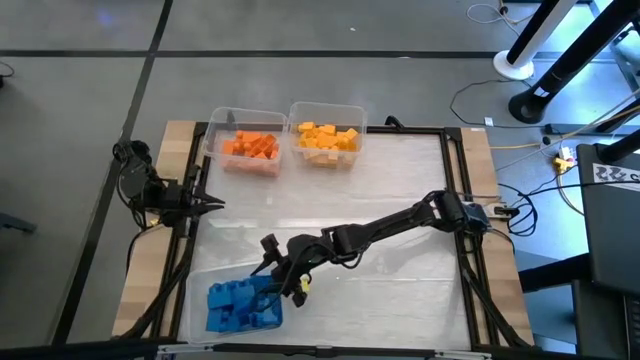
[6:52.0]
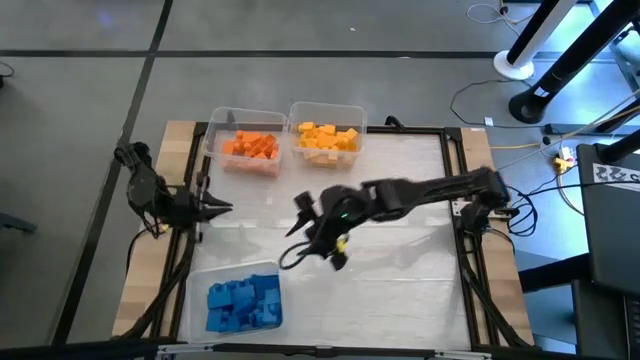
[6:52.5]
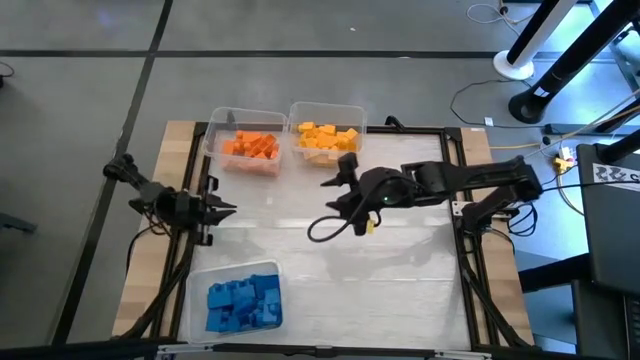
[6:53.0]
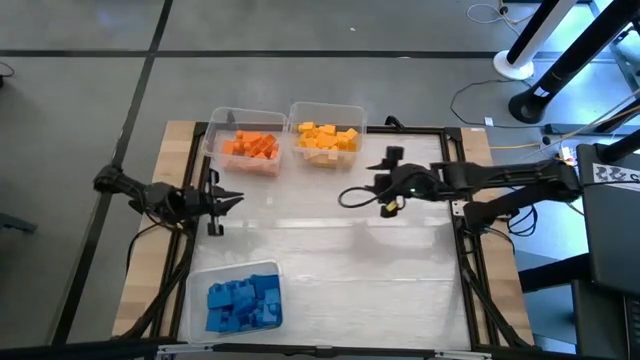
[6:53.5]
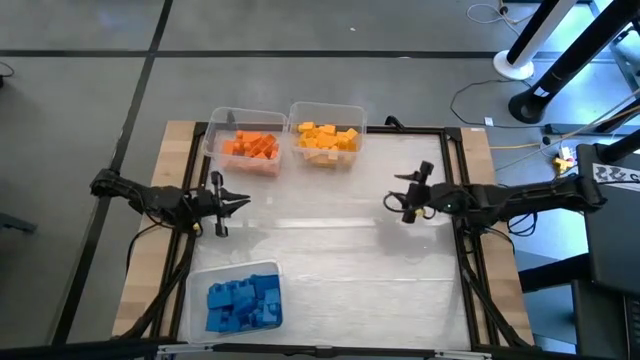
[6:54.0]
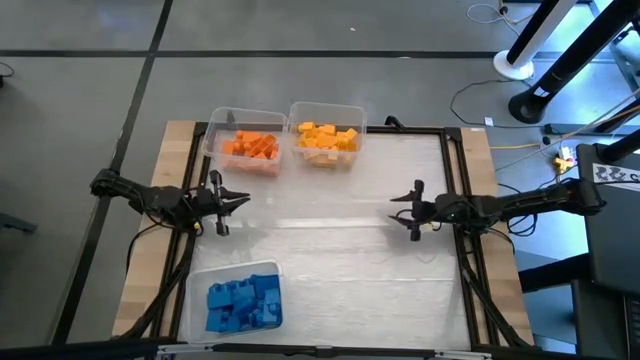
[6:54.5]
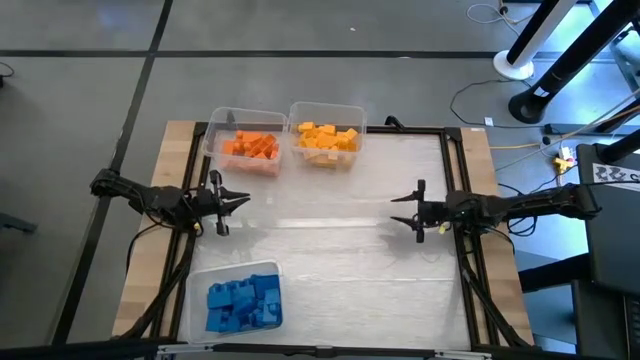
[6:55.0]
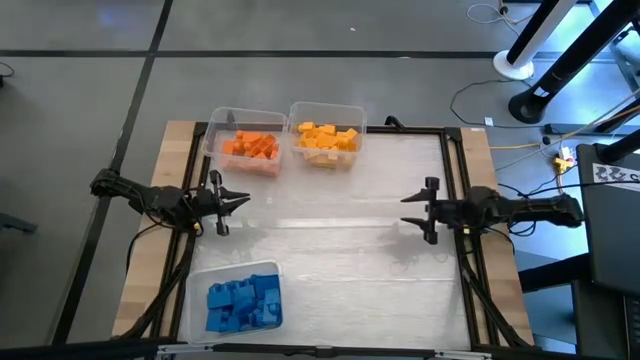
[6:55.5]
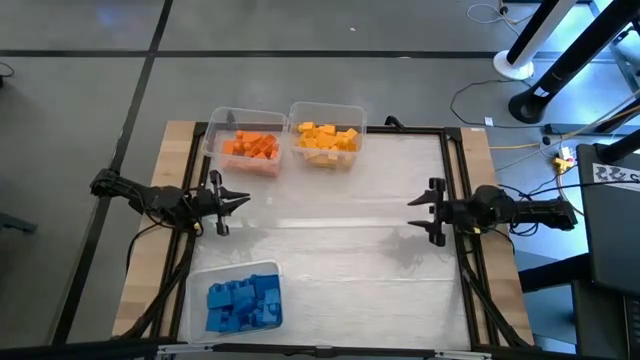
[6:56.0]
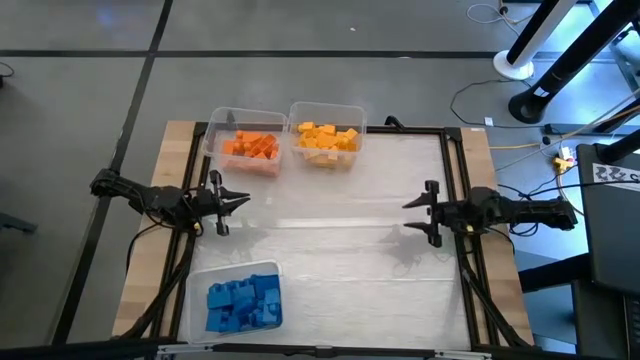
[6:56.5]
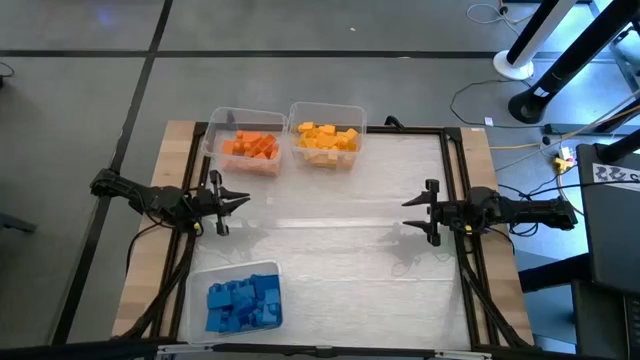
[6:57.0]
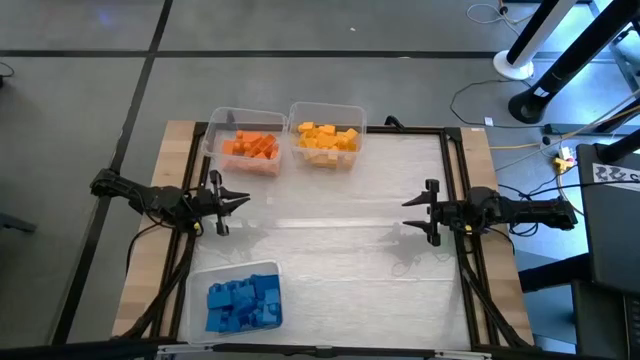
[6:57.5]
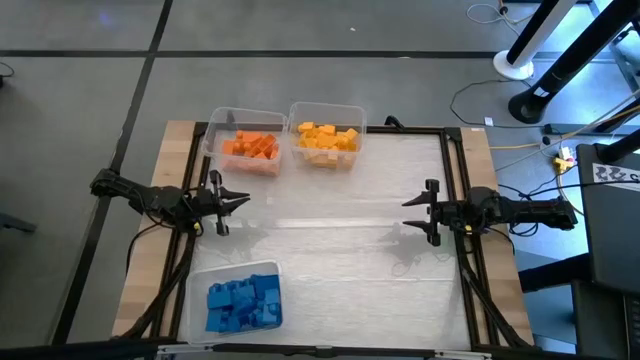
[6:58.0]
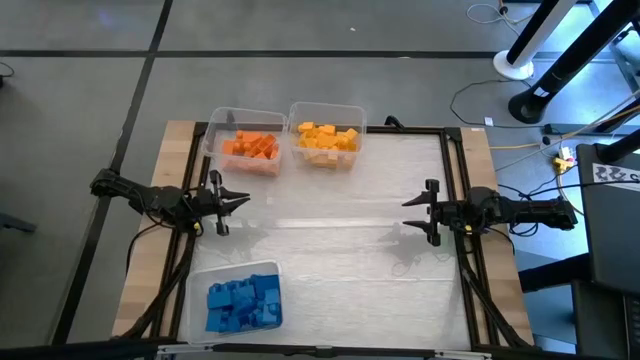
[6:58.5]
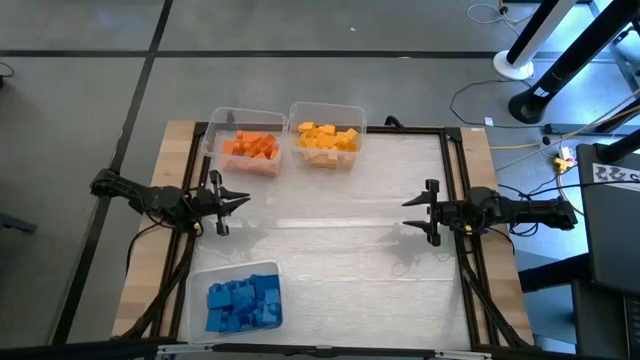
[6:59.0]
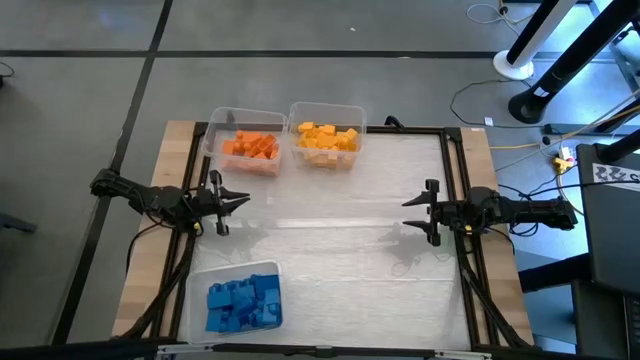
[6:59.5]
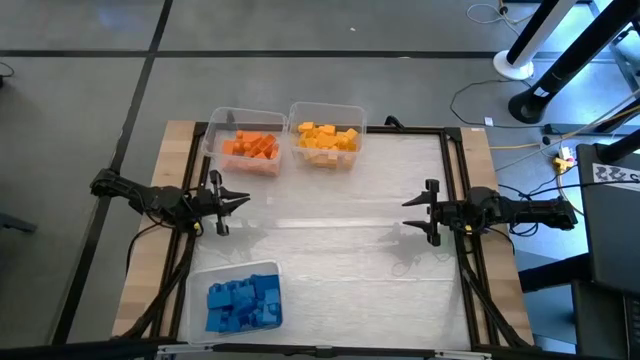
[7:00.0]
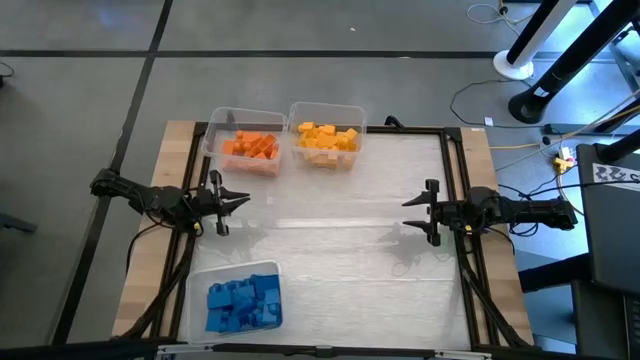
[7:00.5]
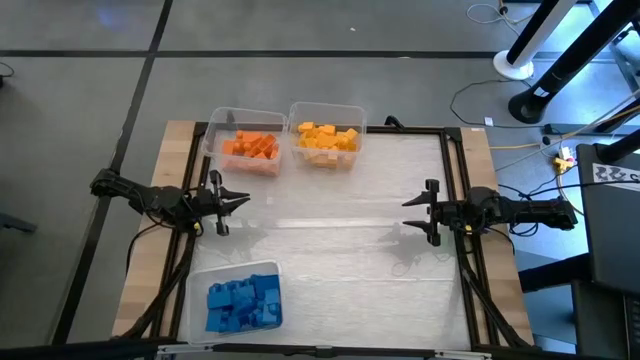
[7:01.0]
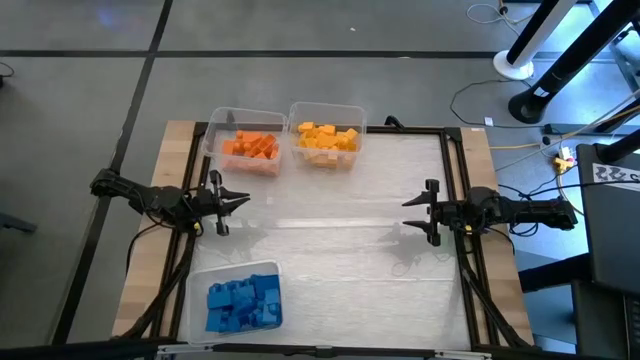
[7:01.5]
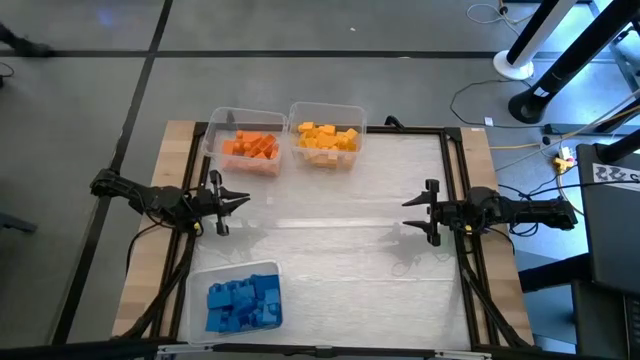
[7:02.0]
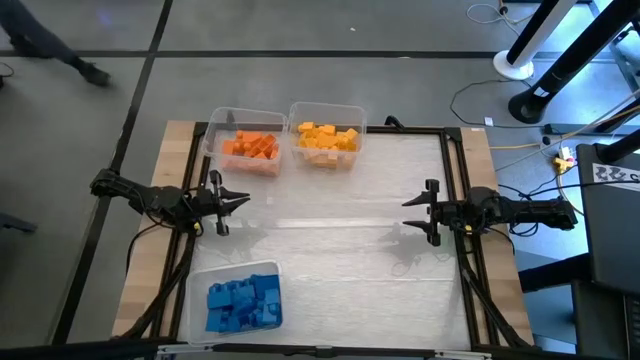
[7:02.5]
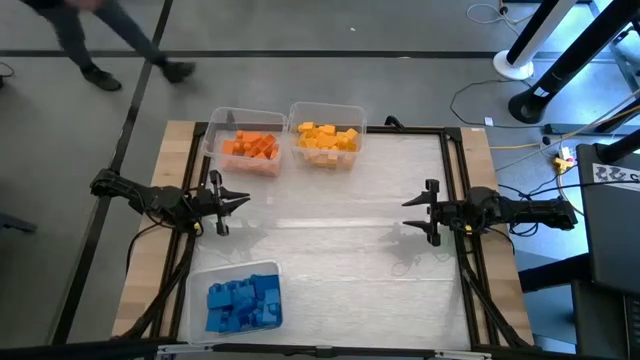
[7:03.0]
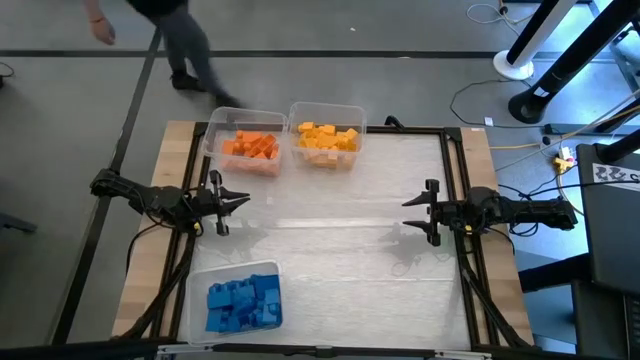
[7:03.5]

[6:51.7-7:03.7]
Task: Sort blocks
Return to Home Position

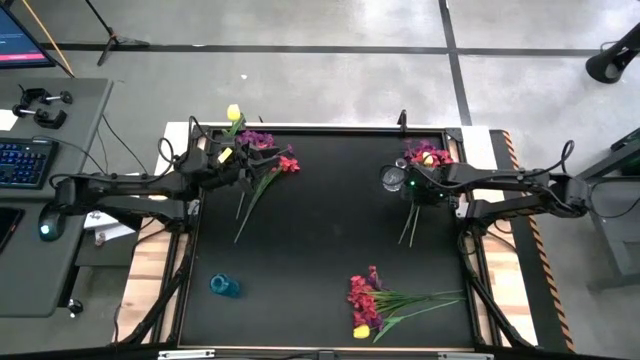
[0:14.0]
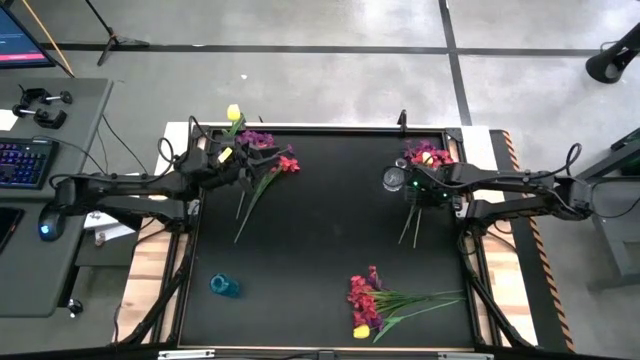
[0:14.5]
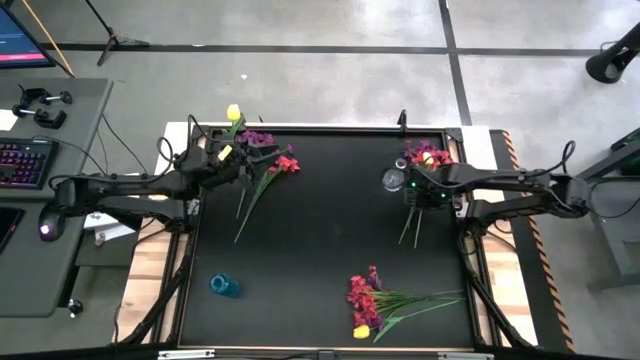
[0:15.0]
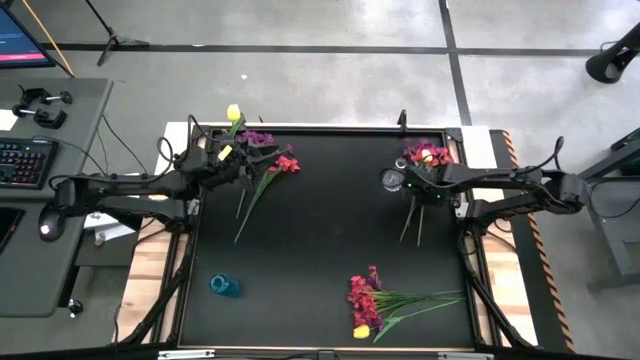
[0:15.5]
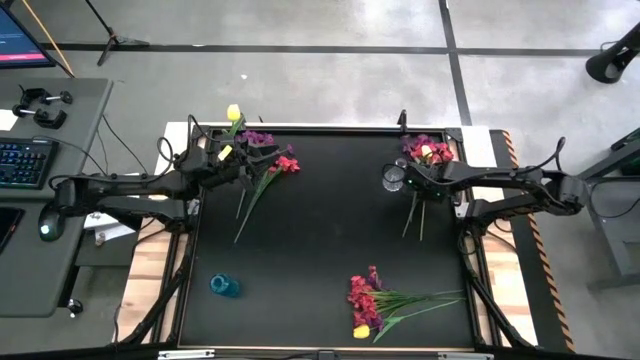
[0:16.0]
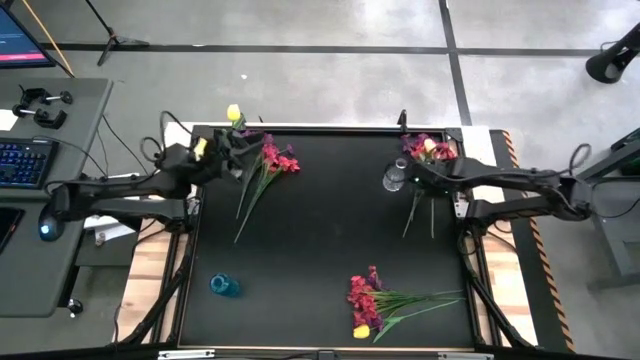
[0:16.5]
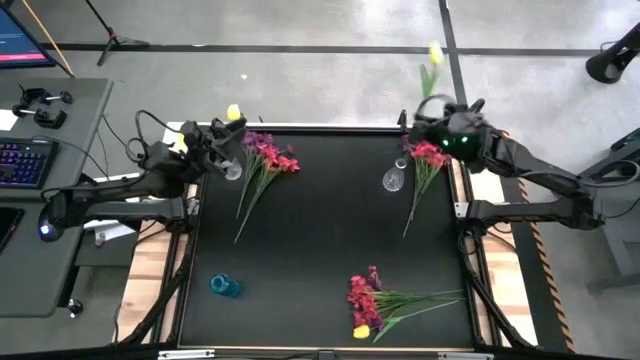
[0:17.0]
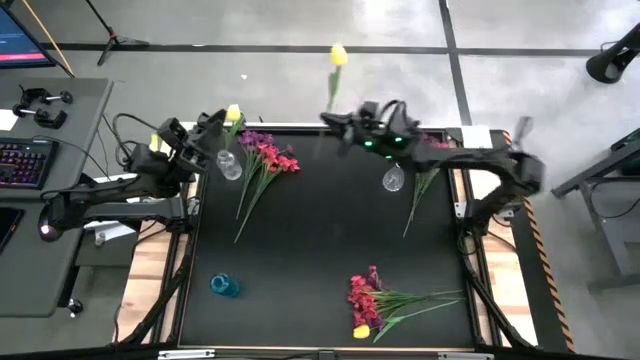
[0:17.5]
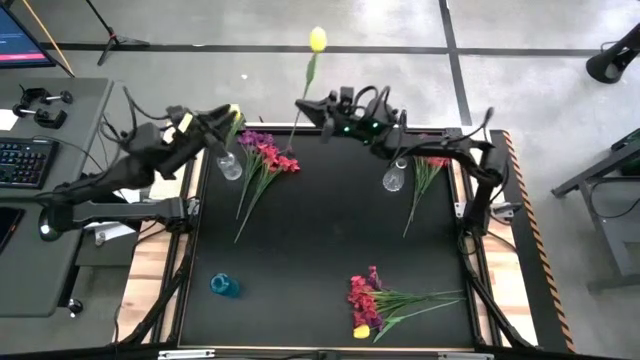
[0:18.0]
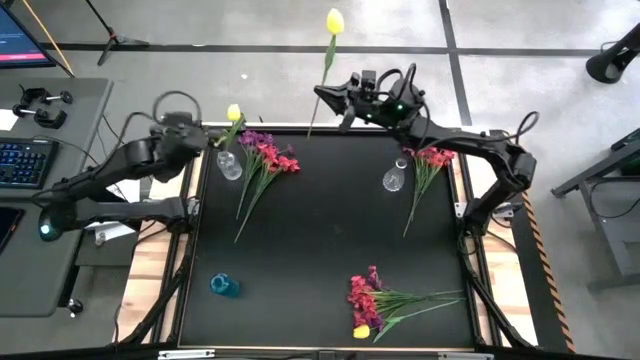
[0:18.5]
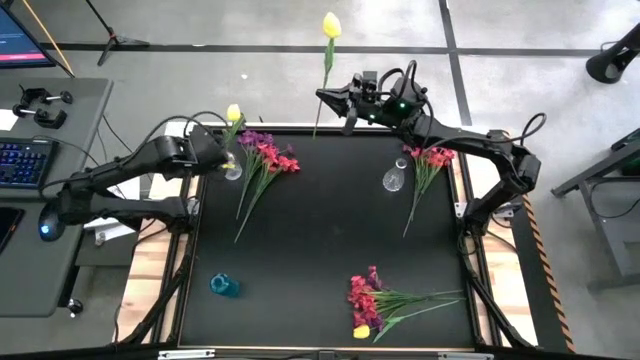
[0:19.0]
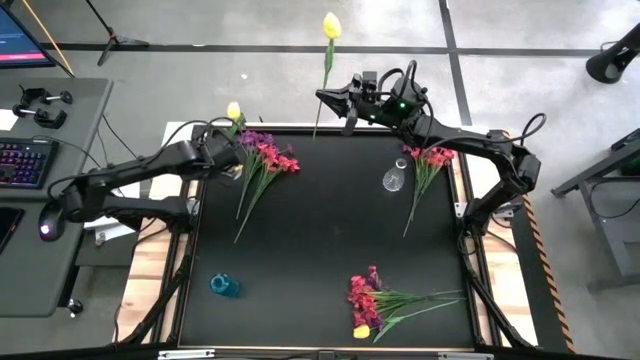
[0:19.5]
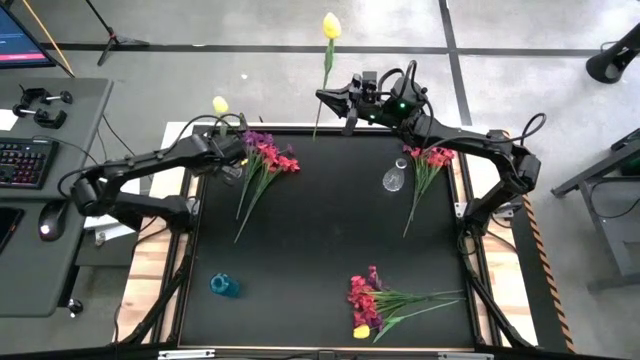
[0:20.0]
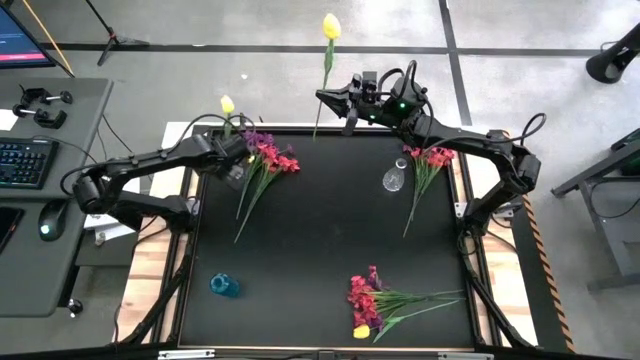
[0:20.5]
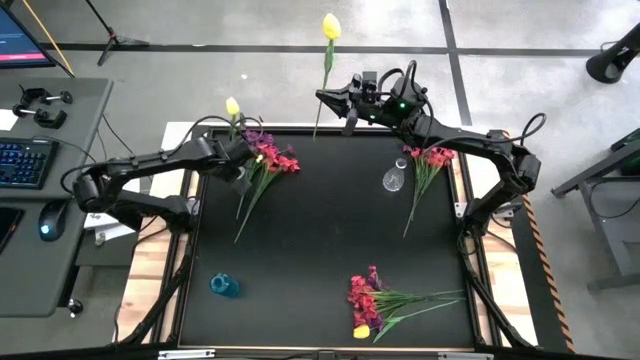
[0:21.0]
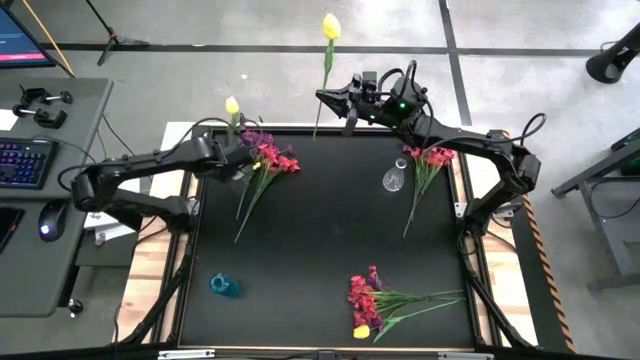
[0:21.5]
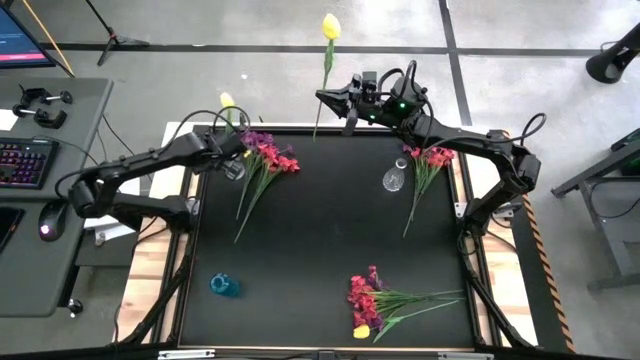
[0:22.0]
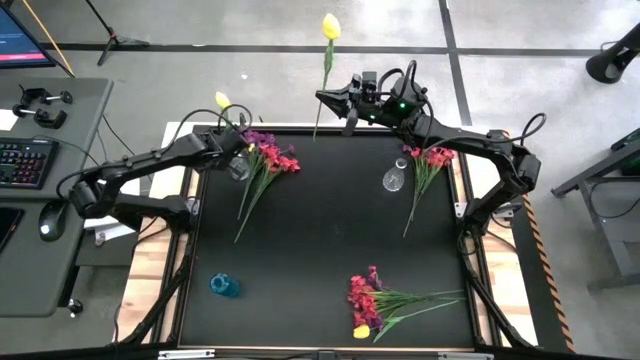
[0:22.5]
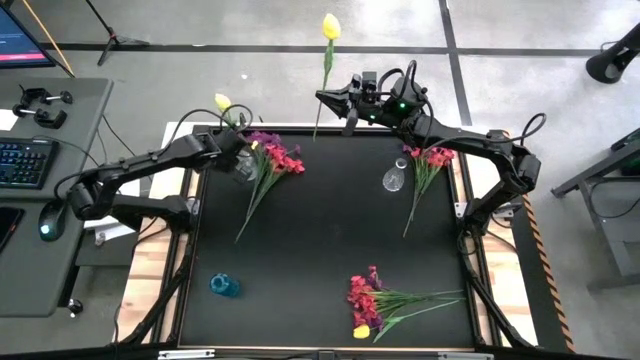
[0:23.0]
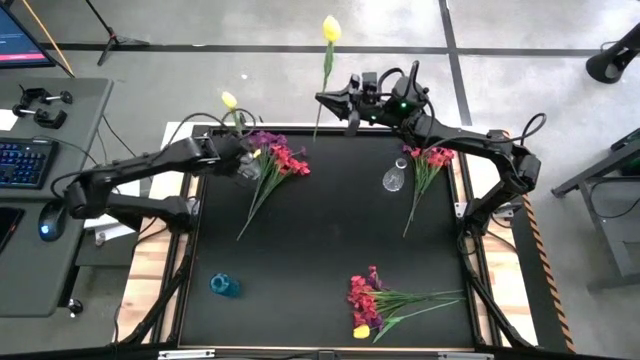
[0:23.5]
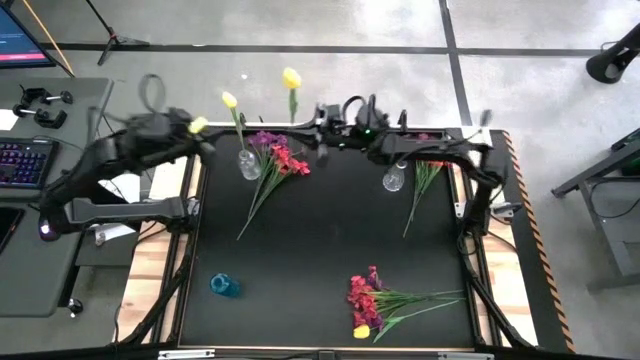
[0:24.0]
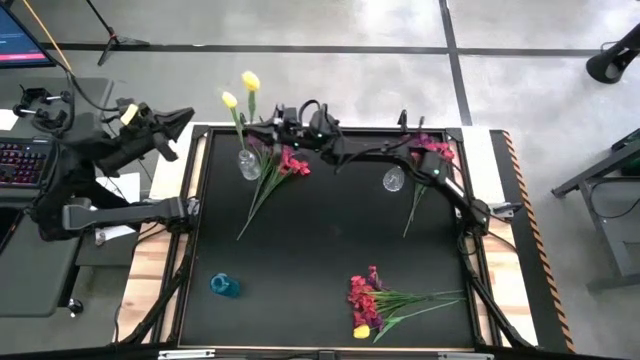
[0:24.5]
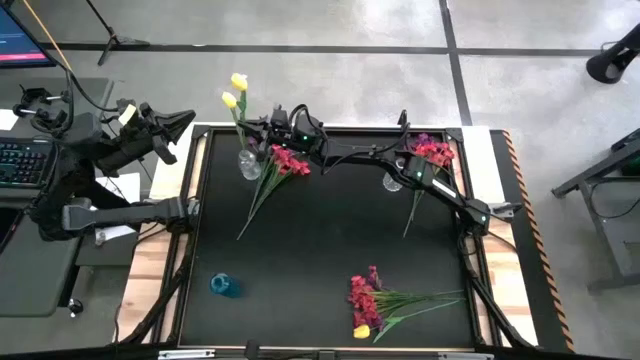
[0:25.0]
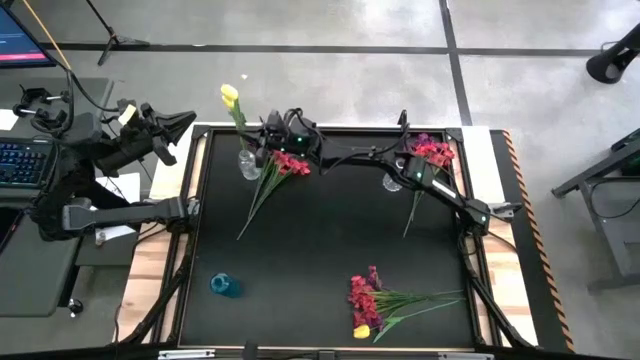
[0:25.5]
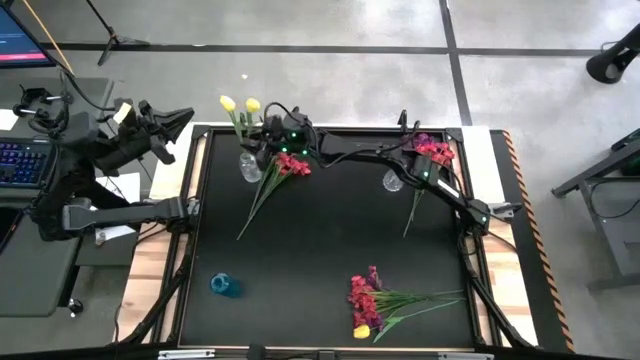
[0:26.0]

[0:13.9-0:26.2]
Task: Sort flowers into vase by color
Put the top yellow flower into the left transparent vase
